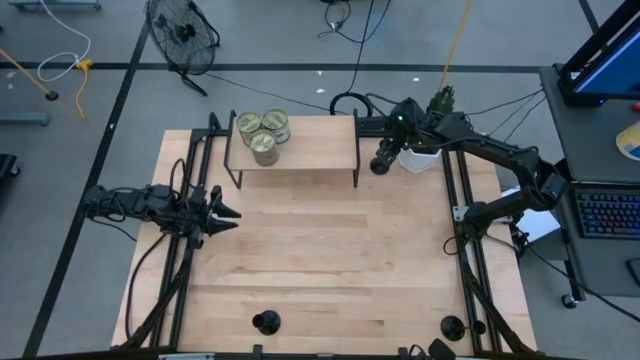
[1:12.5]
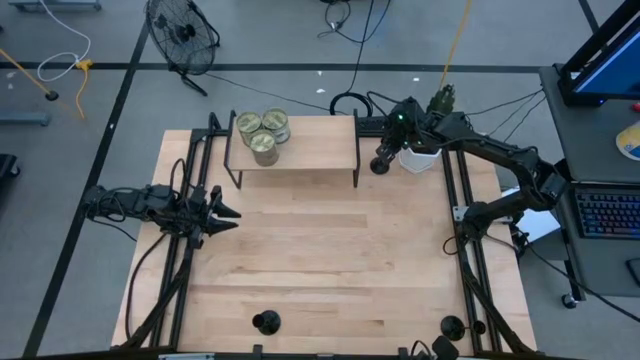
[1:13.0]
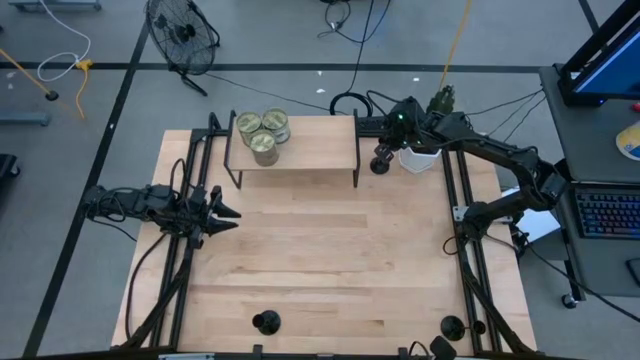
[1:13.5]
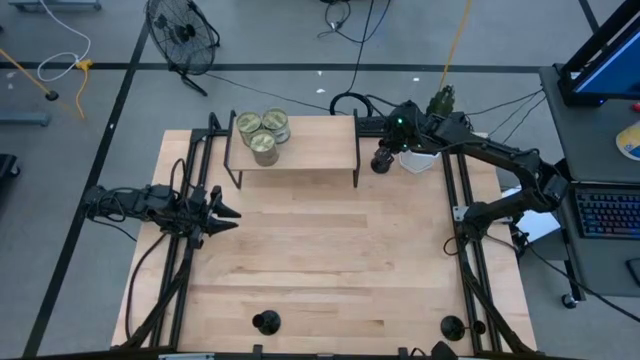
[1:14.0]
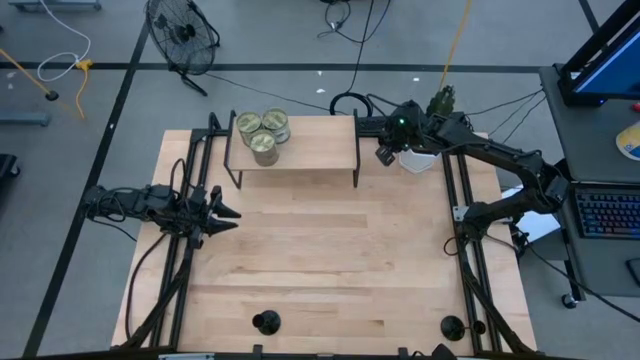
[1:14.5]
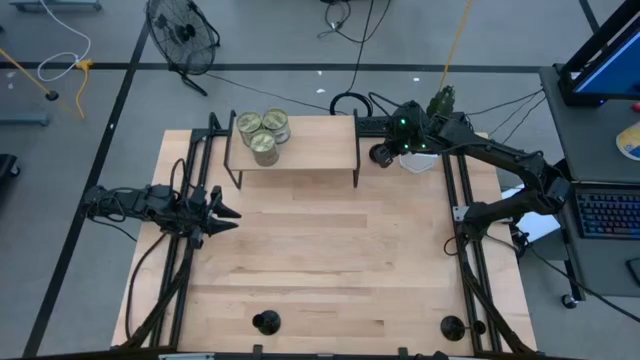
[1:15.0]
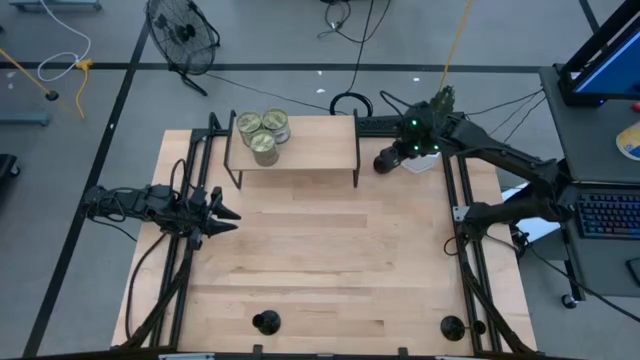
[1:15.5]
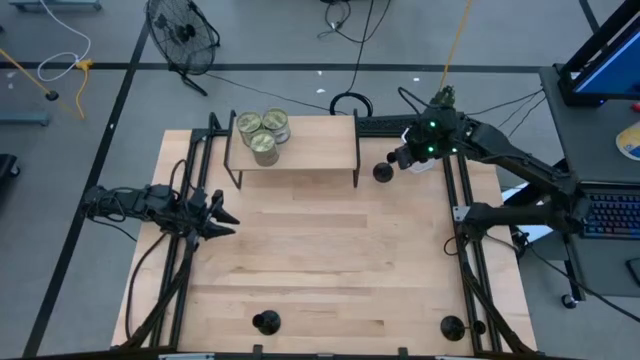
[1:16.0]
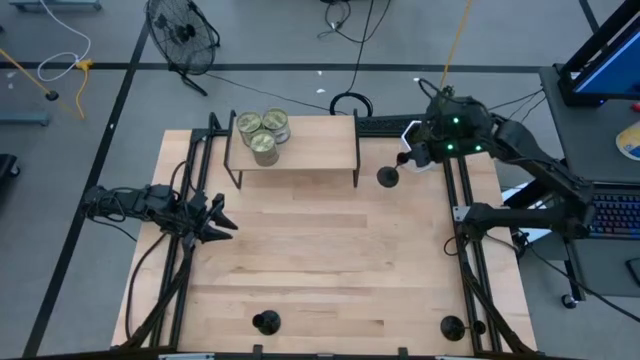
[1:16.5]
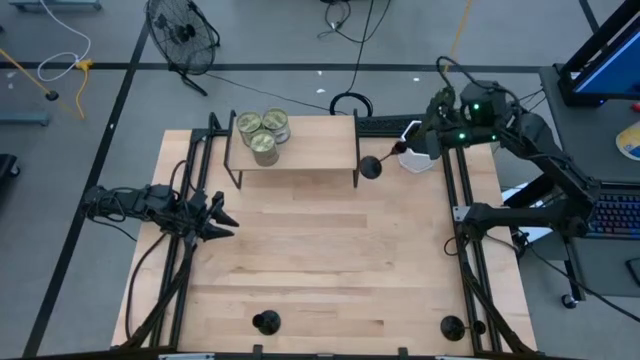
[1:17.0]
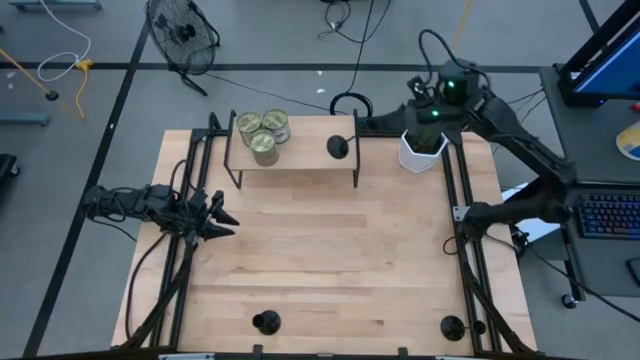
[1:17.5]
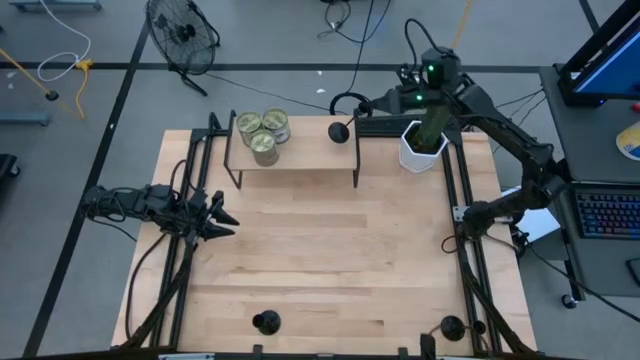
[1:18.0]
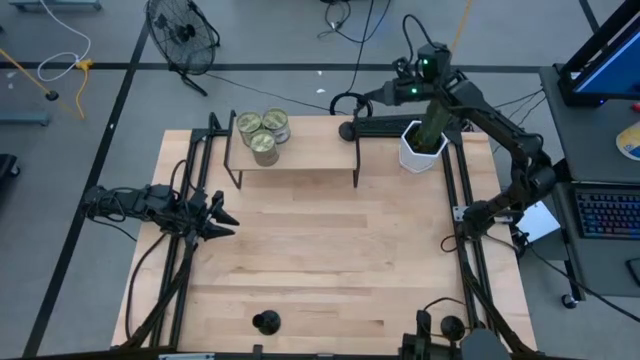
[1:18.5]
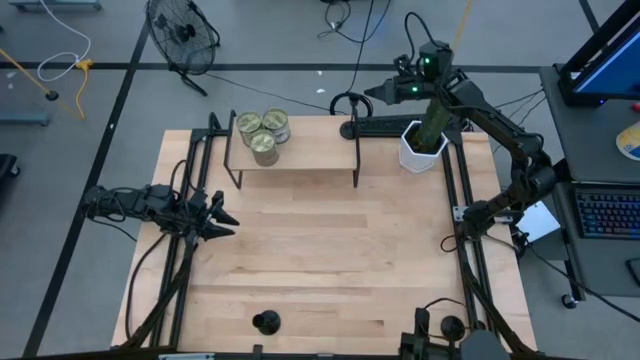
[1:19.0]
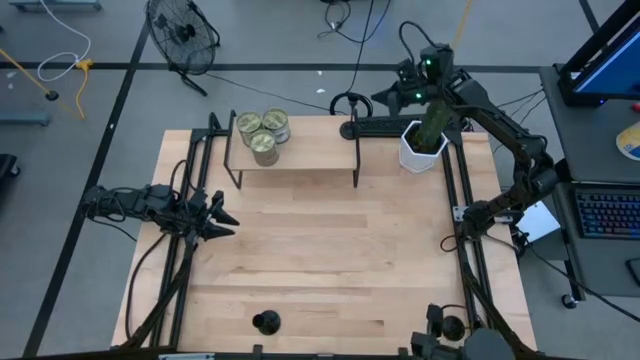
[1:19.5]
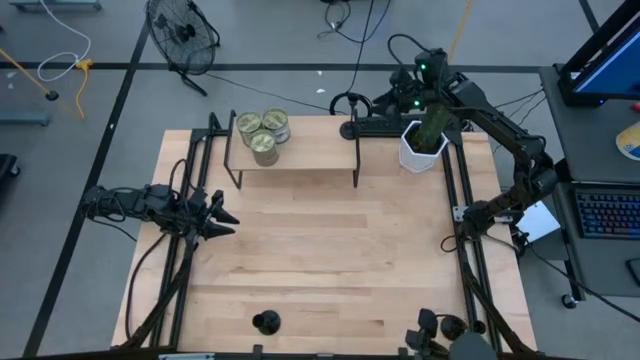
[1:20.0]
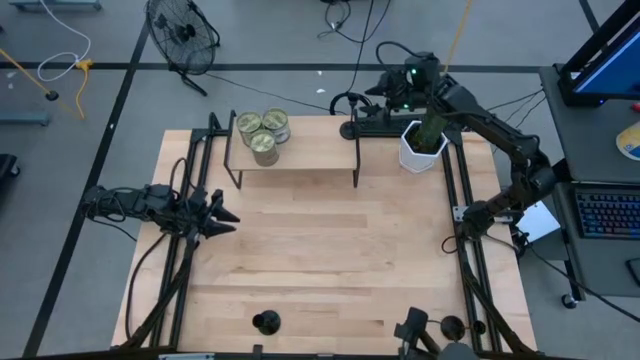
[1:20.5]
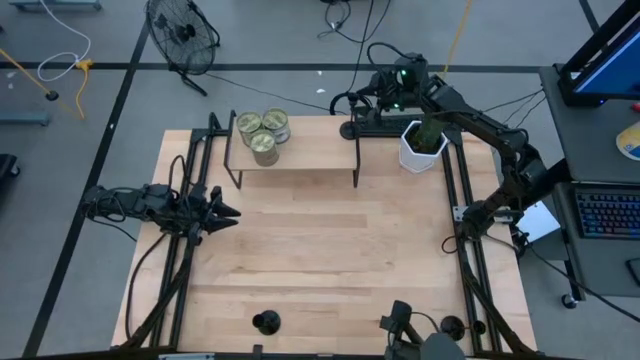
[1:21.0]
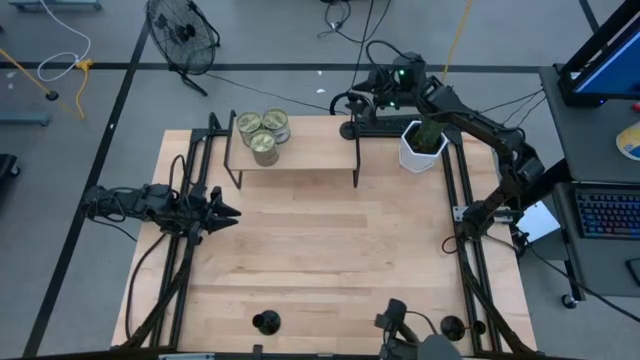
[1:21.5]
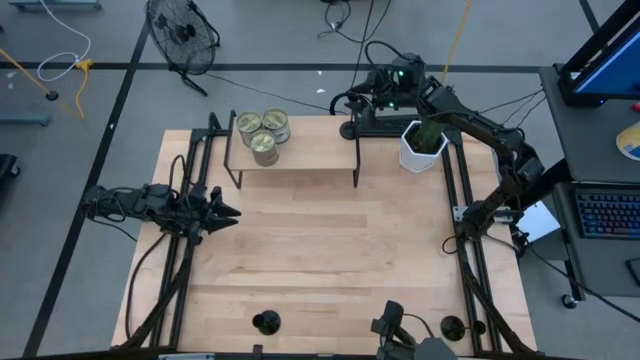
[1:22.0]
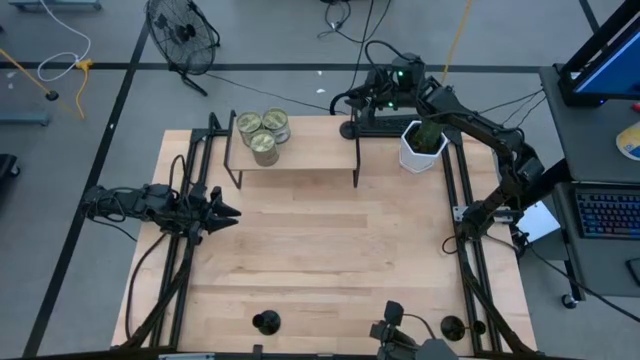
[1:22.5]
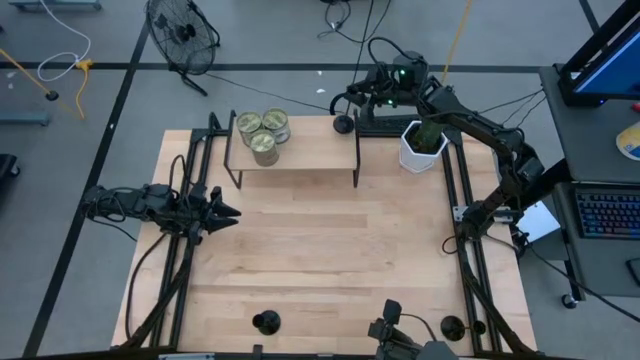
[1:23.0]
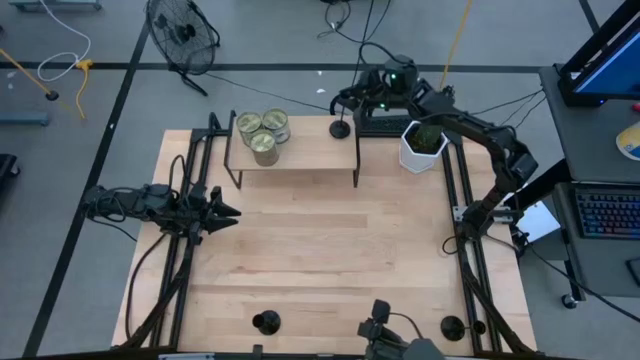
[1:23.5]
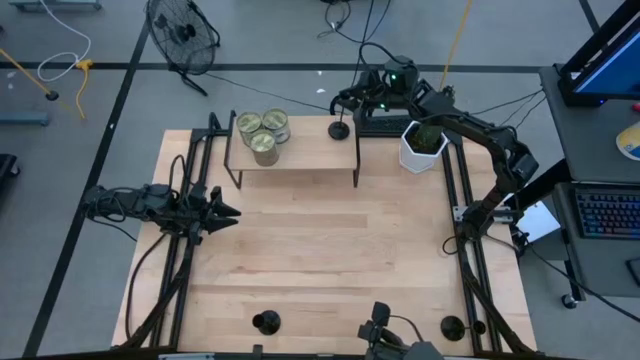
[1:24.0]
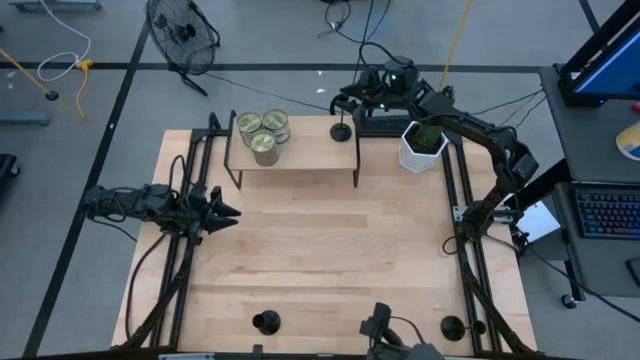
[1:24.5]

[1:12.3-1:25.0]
Task: Pick & Place candle stick holders
Put the top black candle holder on the shelf
